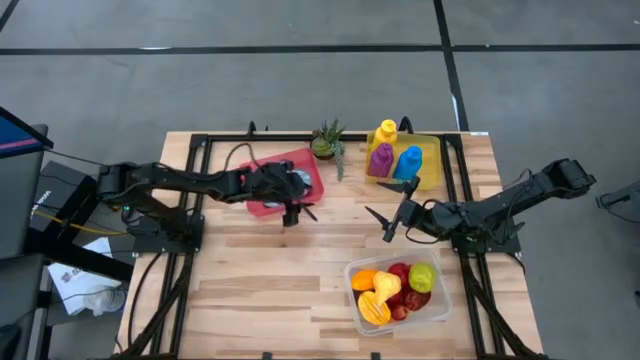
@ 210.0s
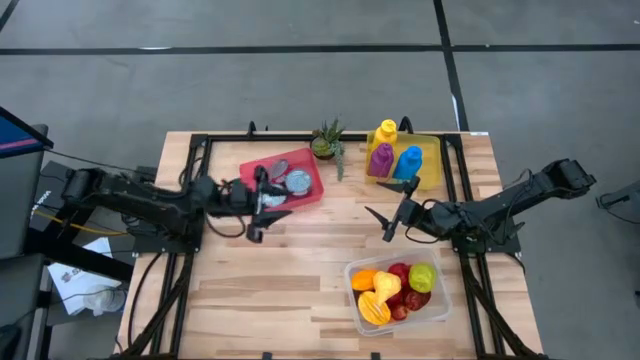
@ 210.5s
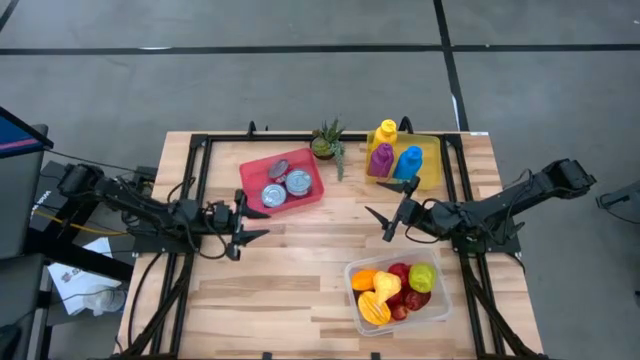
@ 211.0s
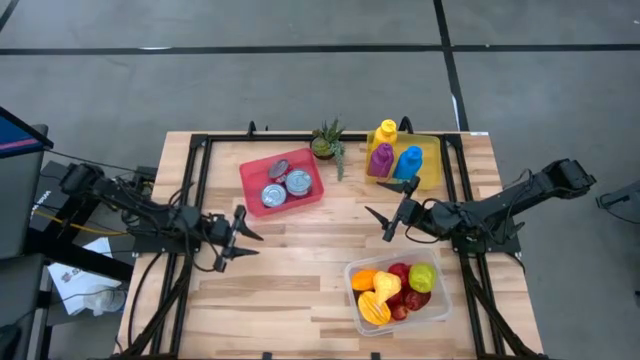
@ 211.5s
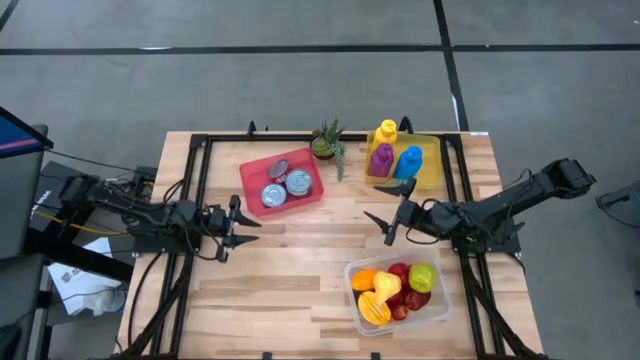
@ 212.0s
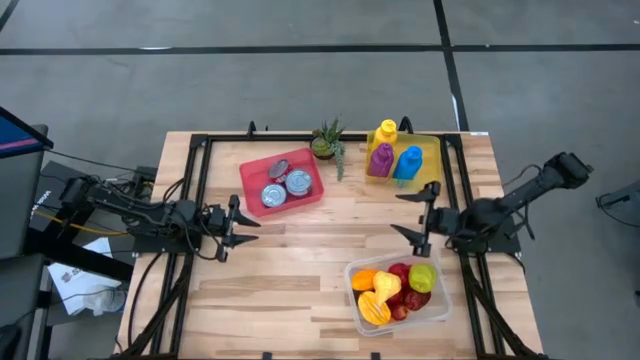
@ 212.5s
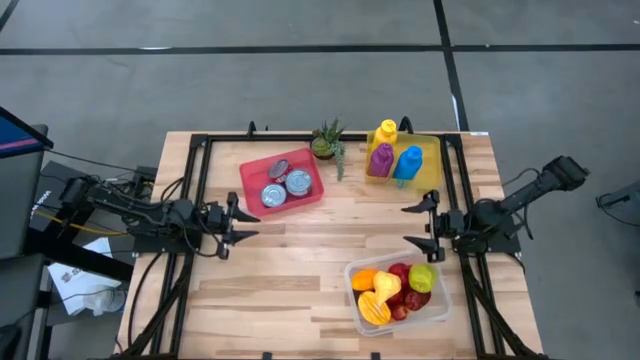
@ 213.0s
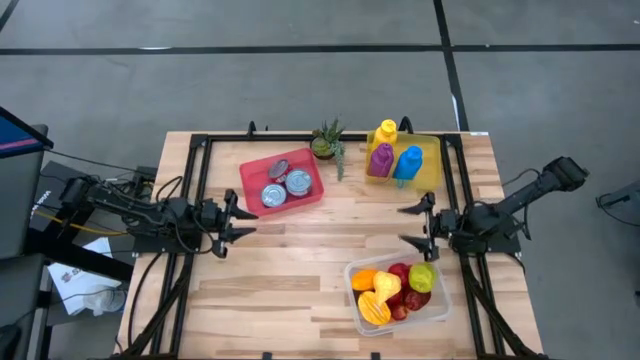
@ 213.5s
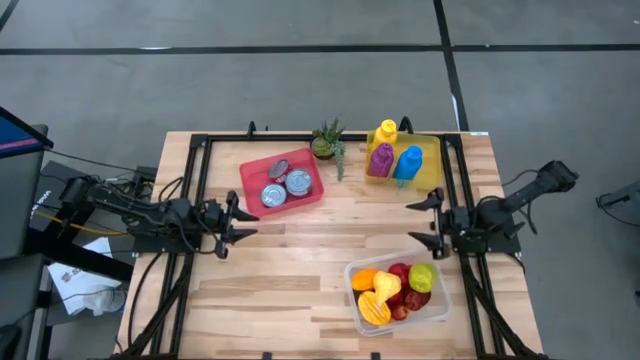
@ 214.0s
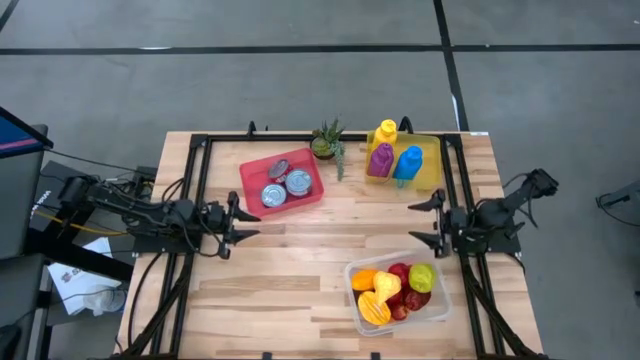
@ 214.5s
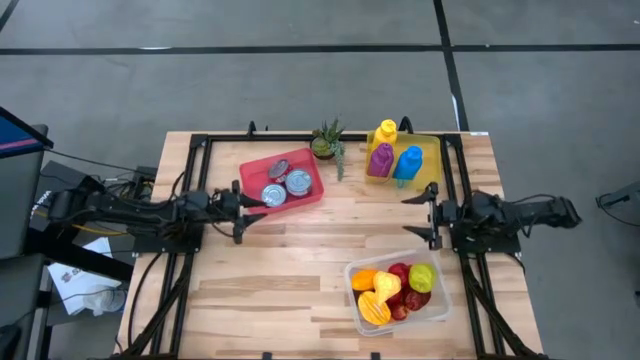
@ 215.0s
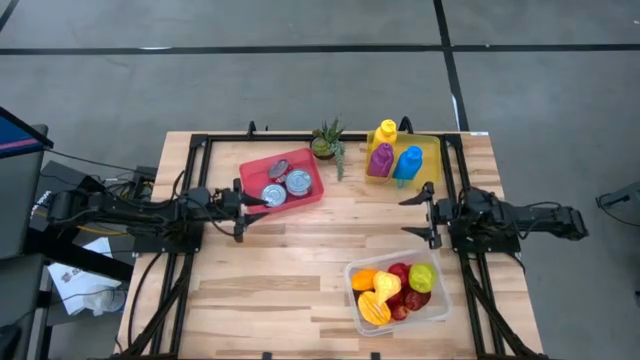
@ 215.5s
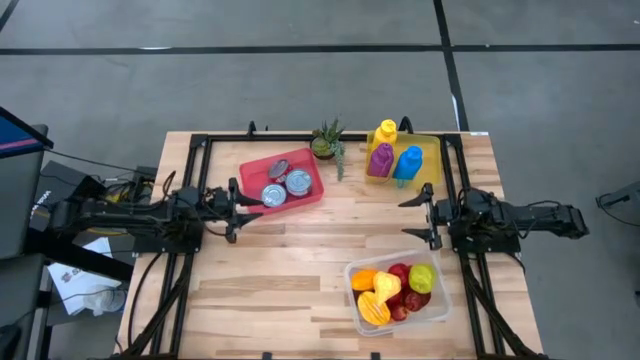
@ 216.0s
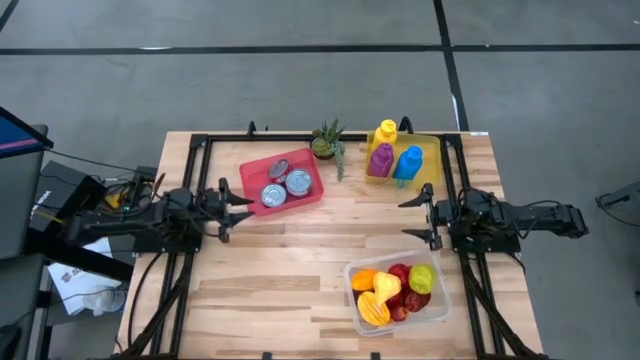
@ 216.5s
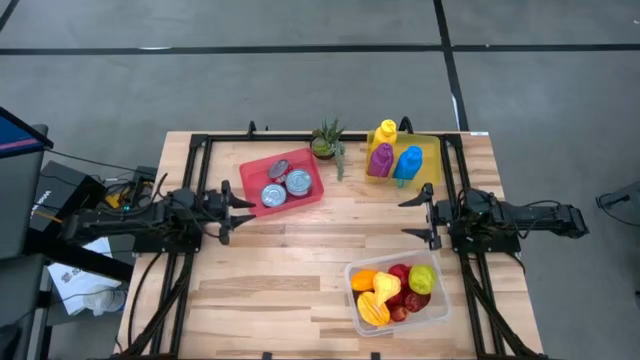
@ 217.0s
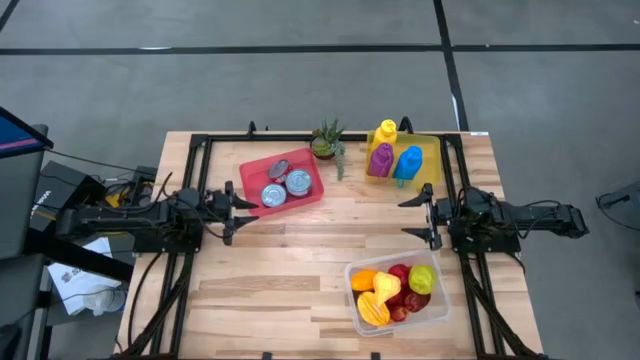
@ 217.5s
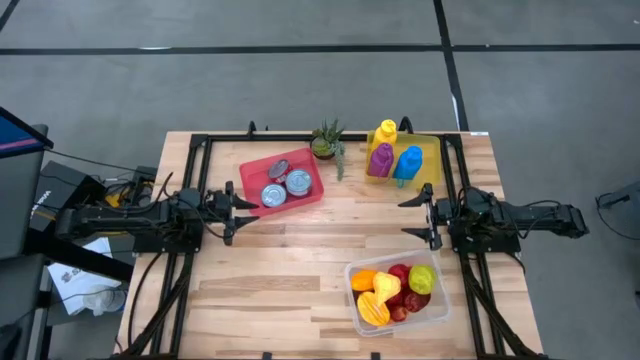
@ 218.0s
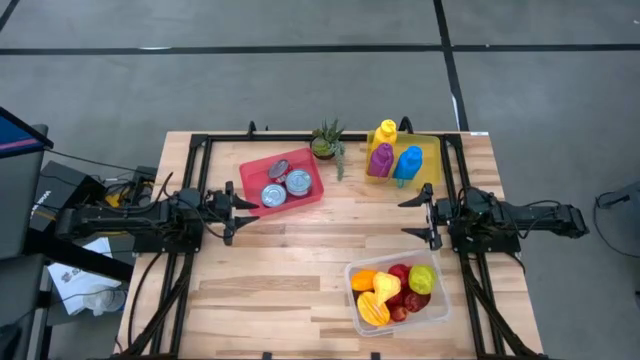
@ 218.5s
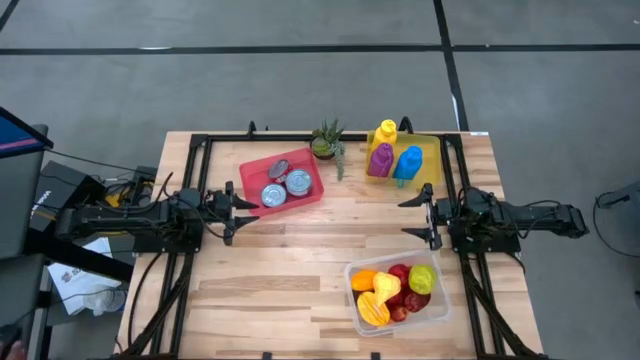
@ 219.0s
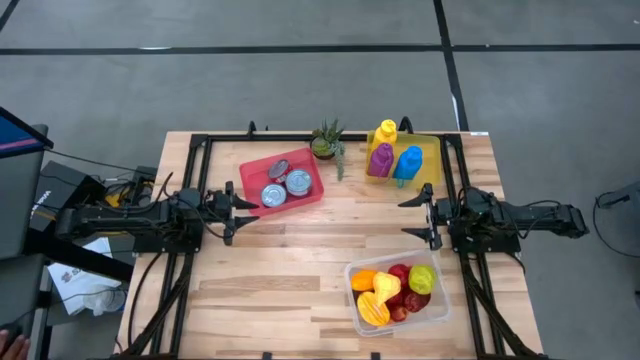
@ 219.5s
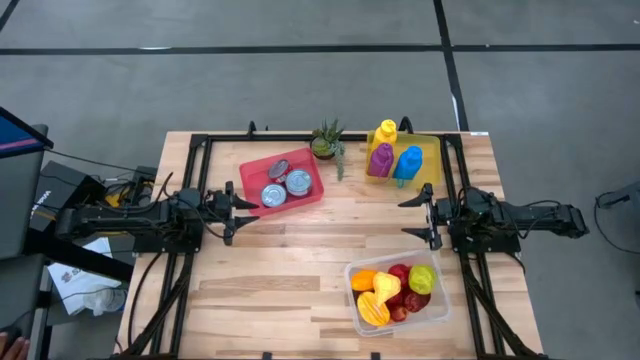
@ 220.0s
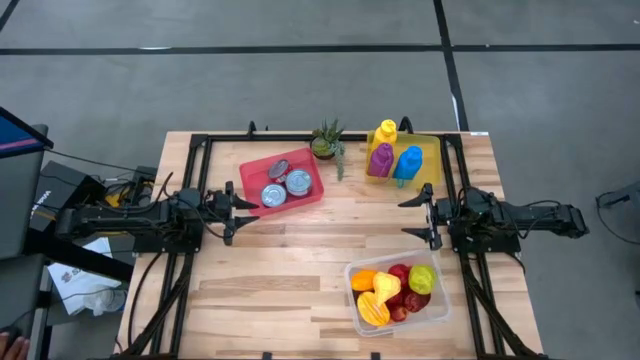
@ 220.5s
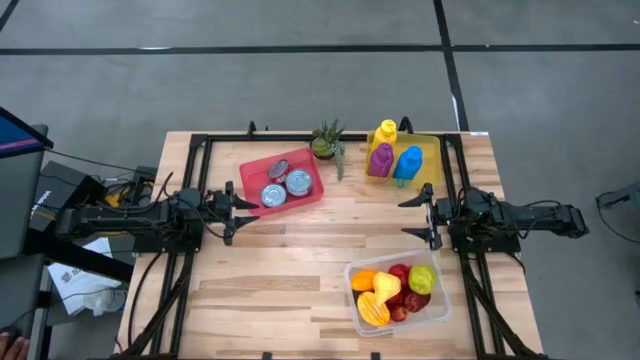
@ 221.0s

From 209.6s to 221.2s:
Task: Pick & Place Food Item
Return to Home Position

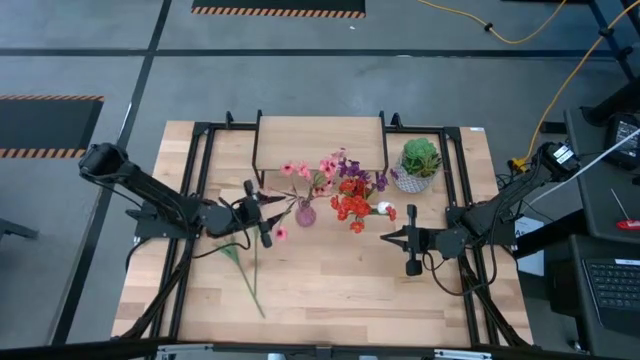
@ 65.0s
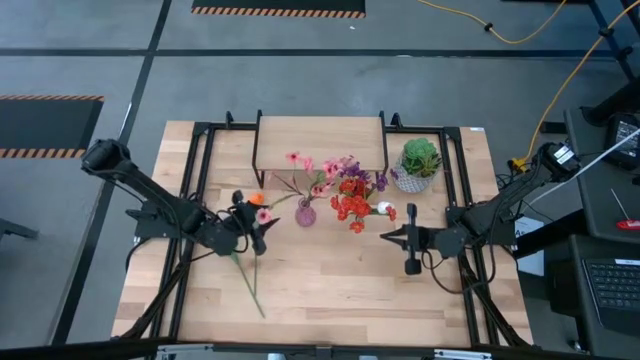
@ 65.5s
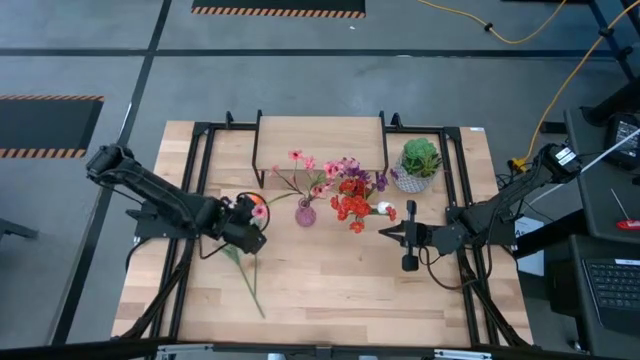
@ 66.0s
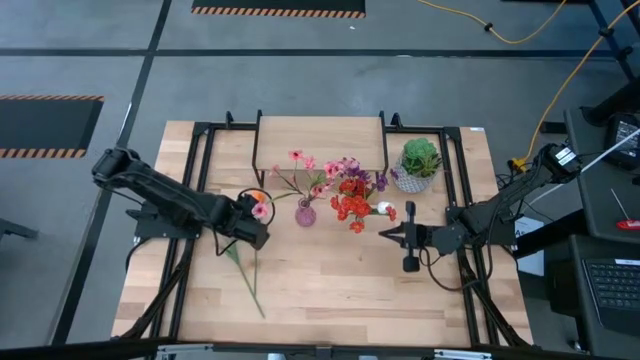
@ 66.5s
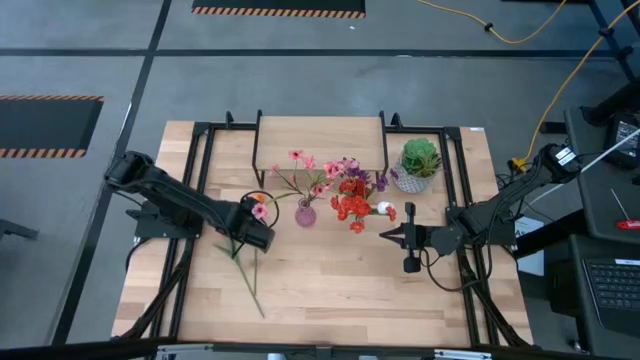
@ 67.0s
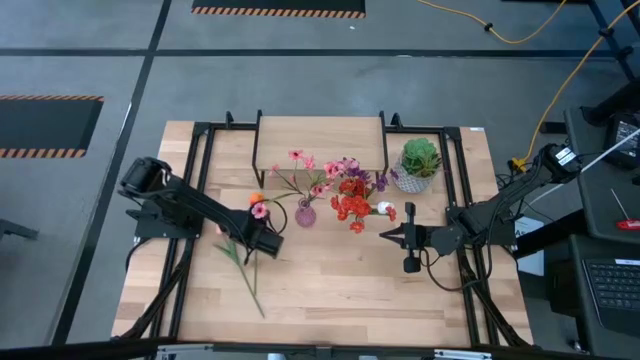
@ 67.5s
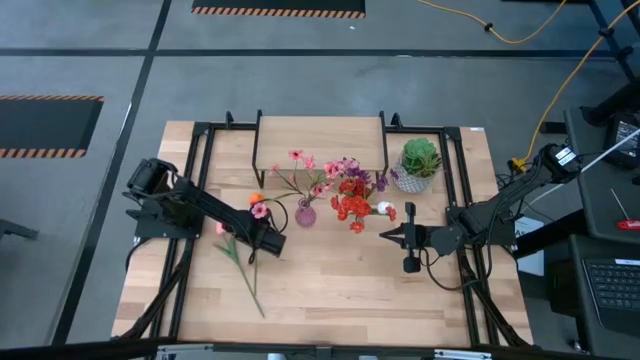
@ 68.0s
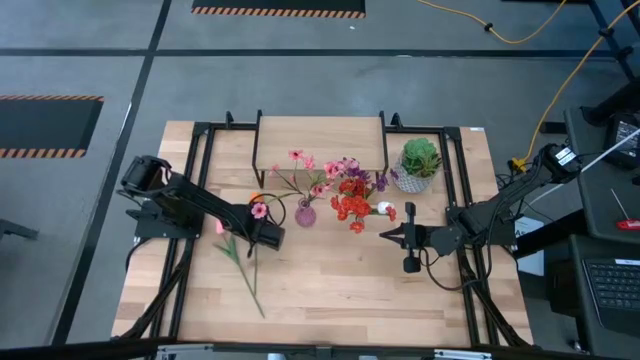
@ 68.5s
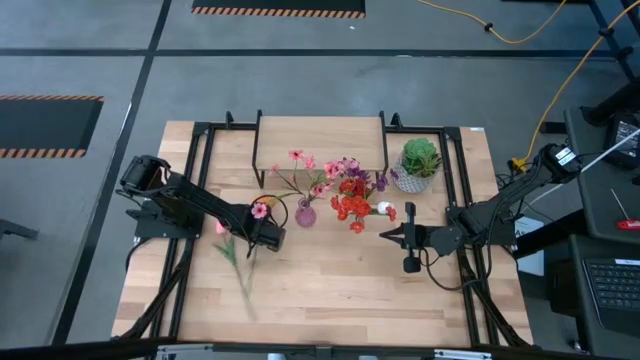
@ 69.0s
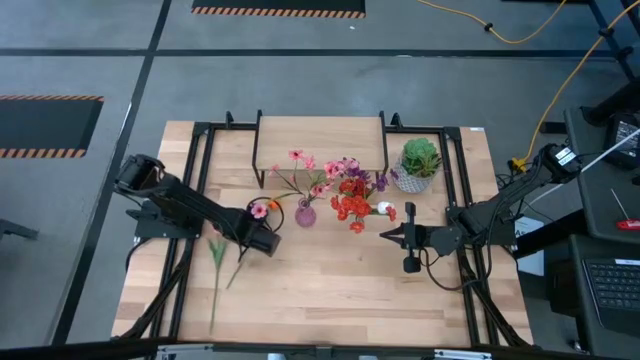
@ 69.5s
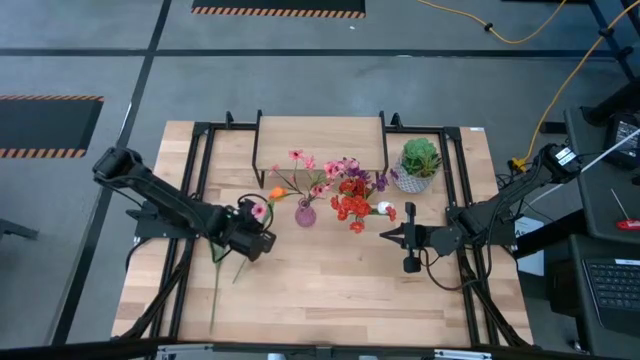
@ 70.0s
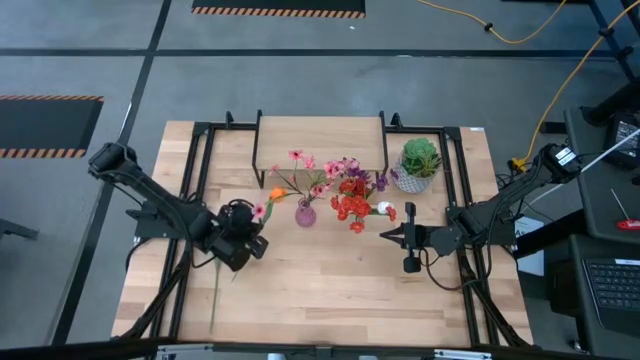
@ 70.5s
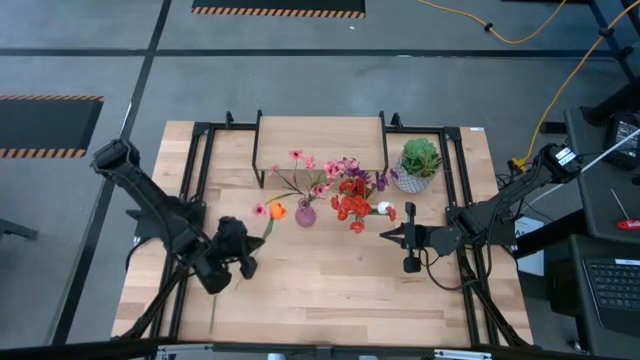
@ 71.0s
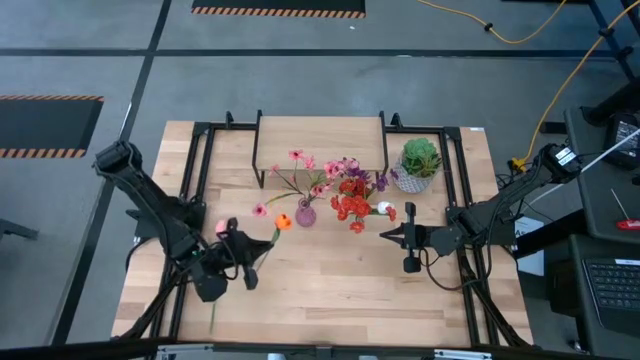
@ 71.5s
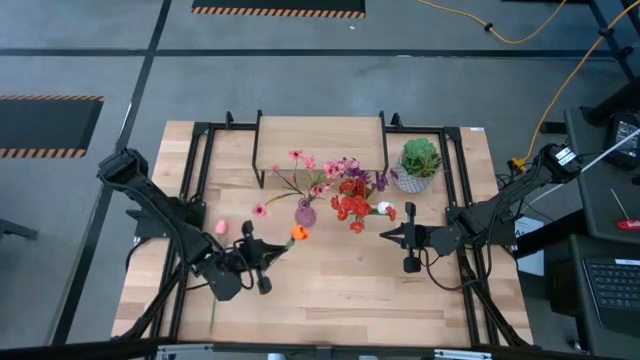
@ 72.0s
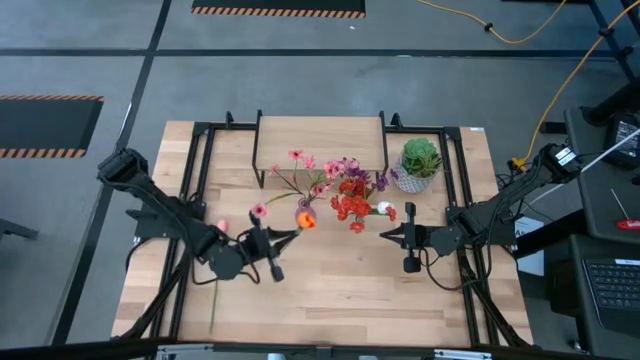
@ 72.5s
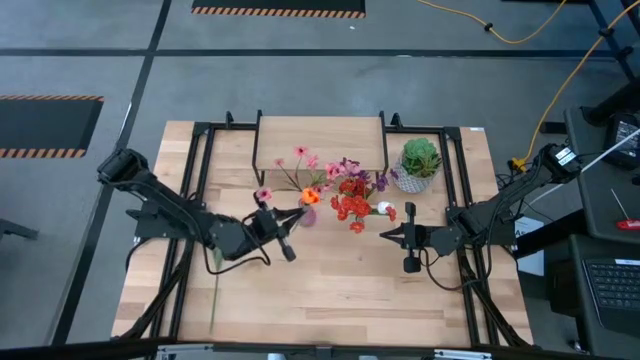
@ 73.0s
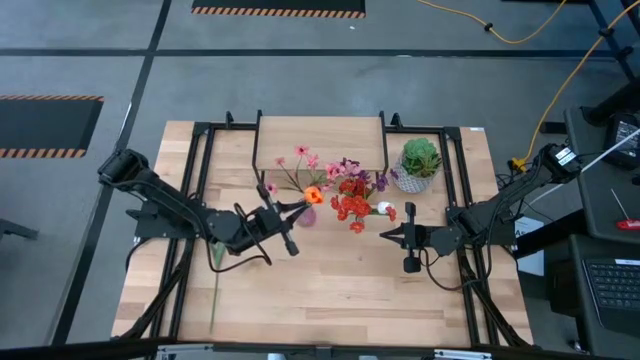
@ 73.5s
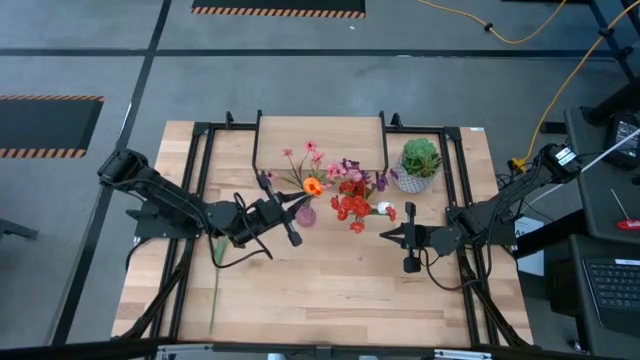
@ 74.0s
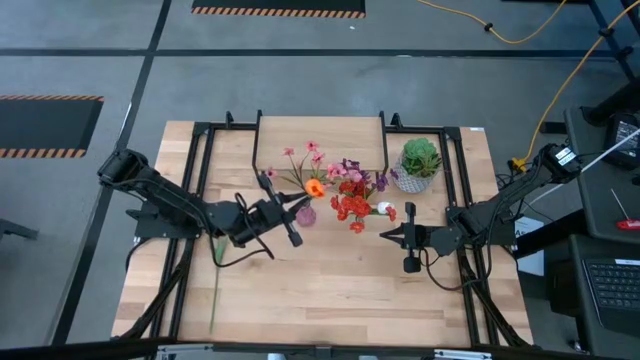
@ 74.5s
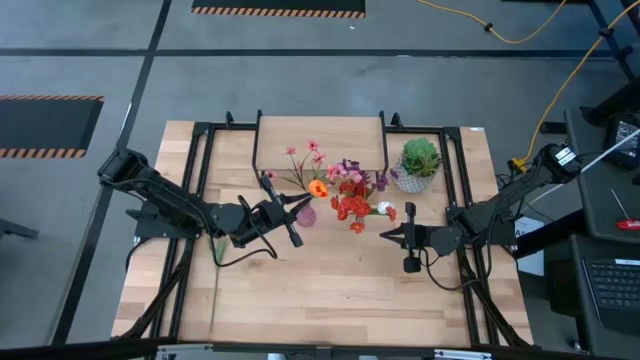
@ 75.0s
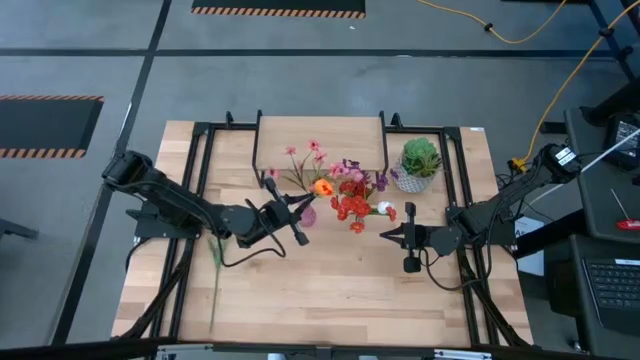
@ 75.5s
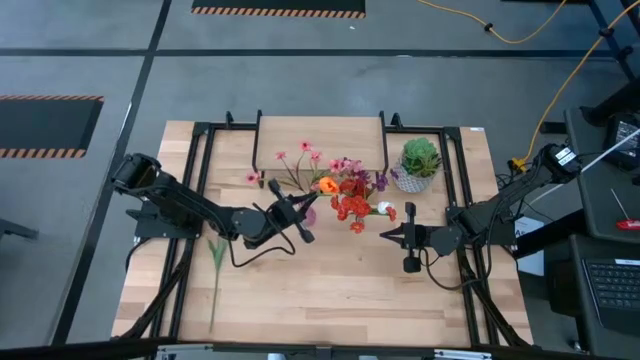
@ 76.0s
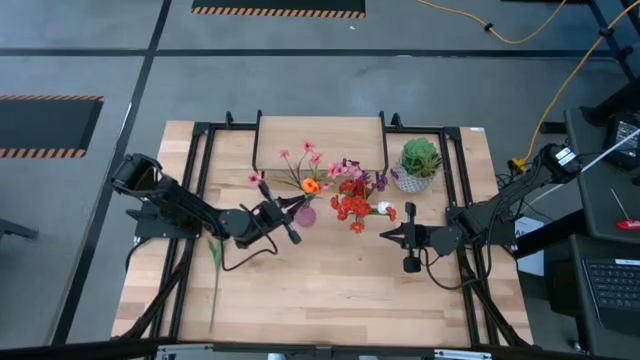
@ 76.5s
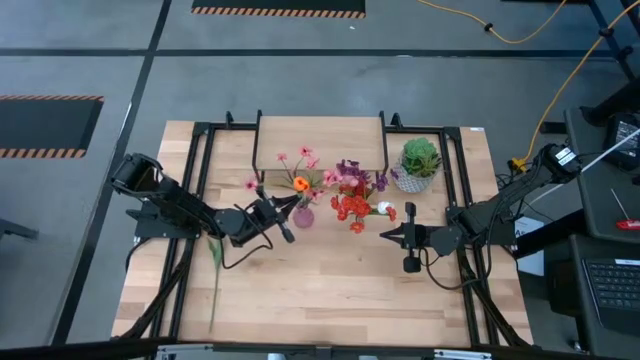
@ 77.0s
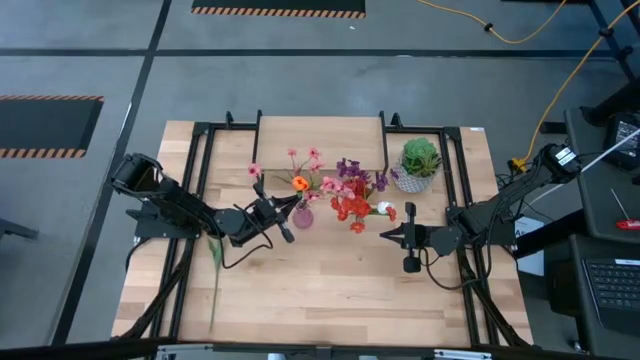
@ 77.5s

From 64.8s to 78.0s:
Task: Pick and place flowers into a vace then onto a shelf
Put the orange flower into the purple vase
